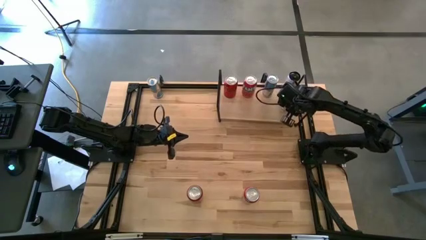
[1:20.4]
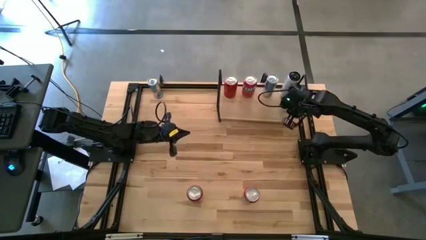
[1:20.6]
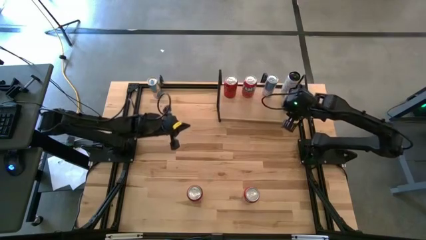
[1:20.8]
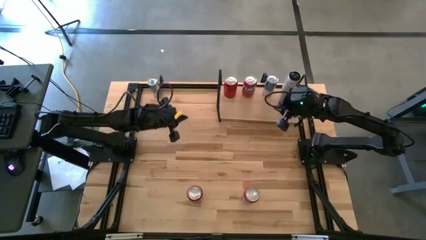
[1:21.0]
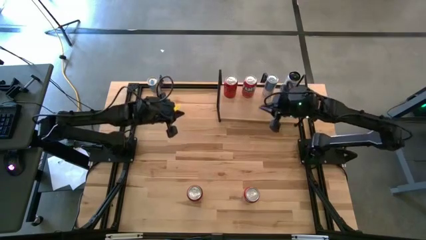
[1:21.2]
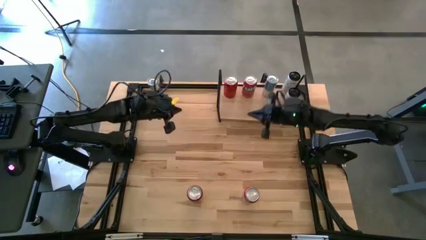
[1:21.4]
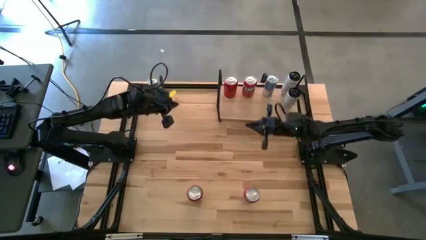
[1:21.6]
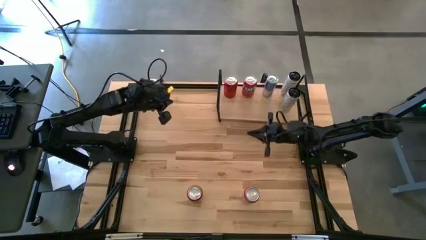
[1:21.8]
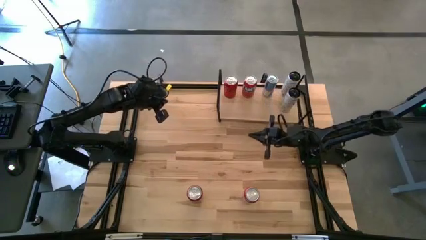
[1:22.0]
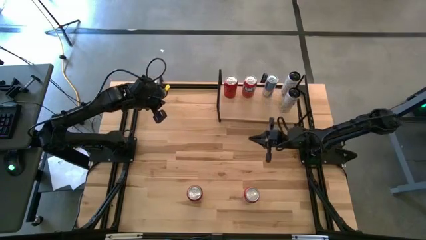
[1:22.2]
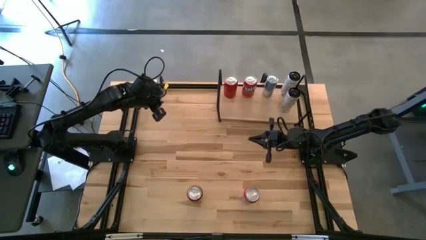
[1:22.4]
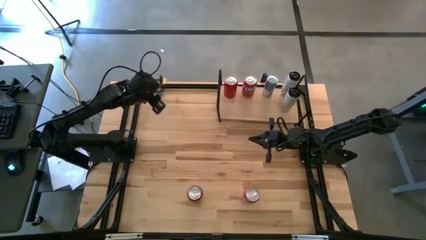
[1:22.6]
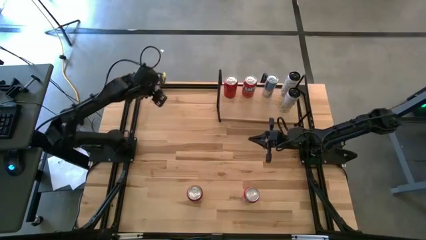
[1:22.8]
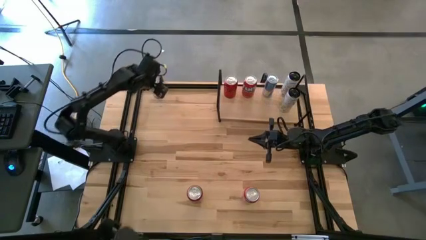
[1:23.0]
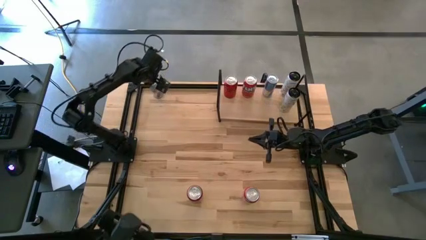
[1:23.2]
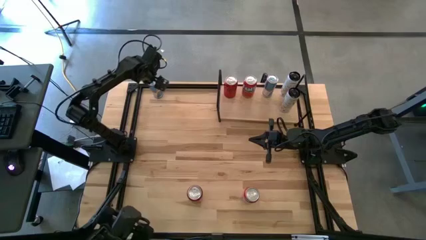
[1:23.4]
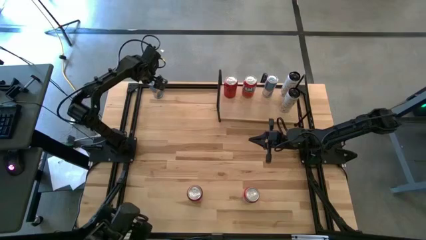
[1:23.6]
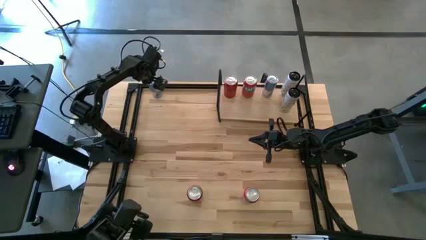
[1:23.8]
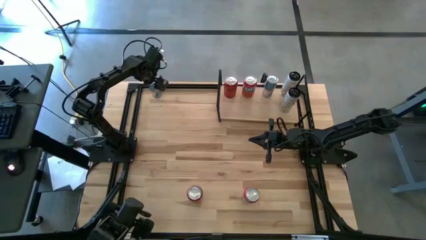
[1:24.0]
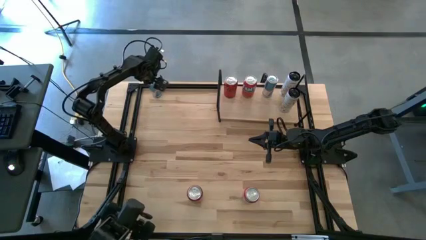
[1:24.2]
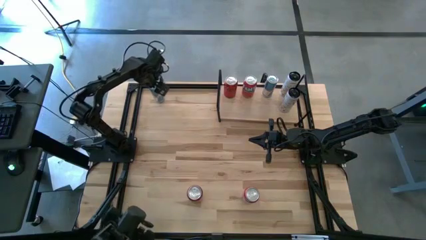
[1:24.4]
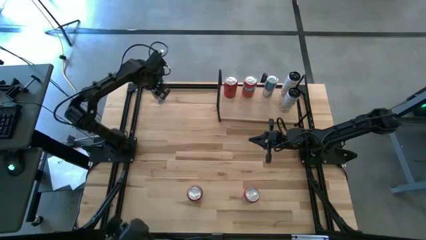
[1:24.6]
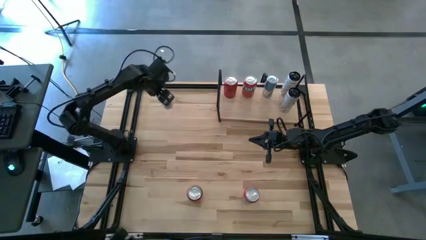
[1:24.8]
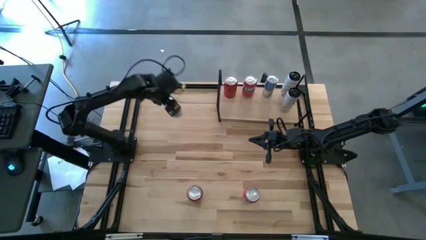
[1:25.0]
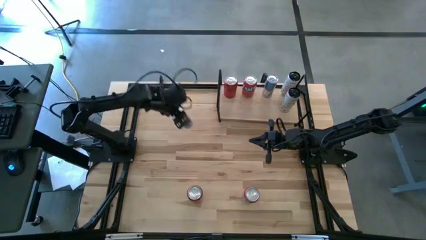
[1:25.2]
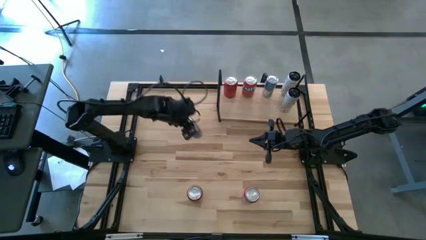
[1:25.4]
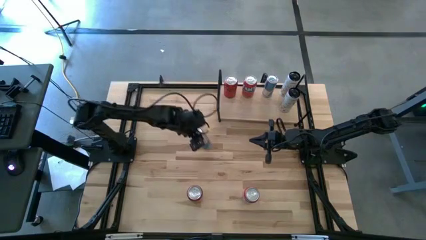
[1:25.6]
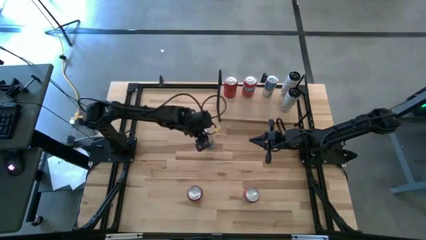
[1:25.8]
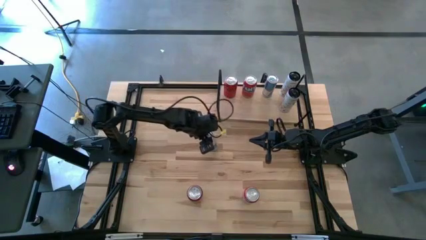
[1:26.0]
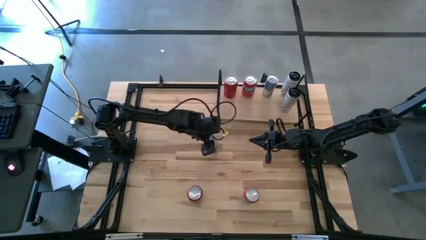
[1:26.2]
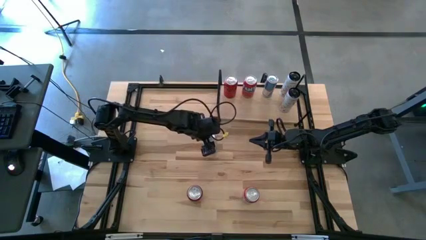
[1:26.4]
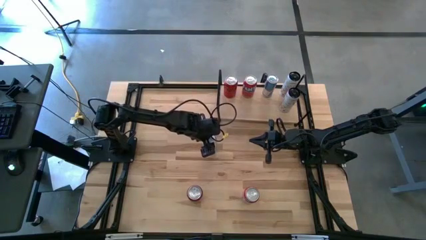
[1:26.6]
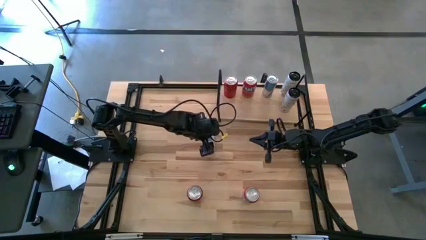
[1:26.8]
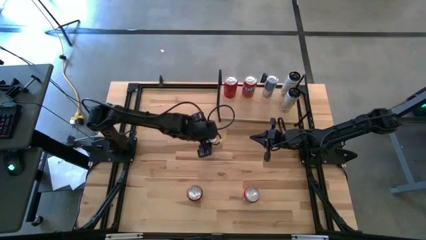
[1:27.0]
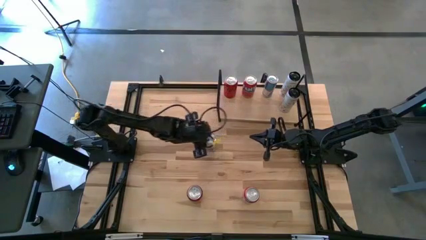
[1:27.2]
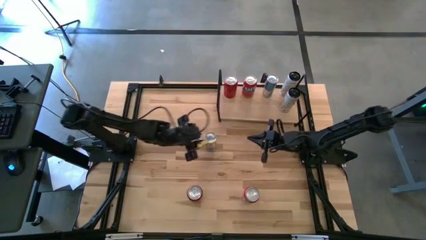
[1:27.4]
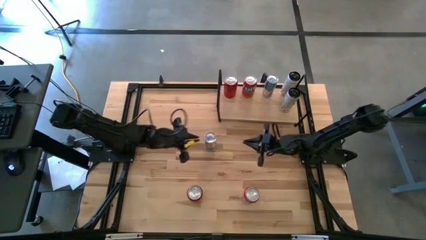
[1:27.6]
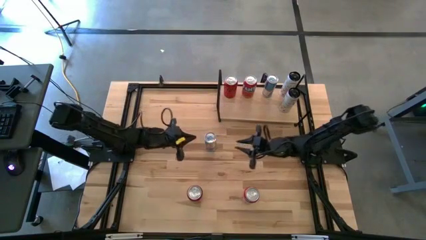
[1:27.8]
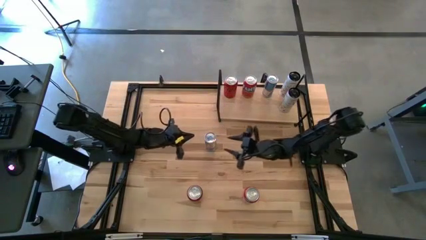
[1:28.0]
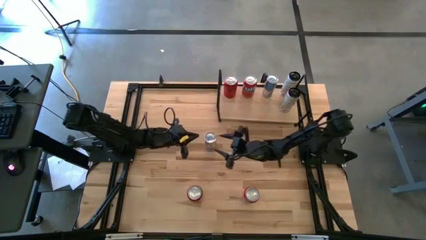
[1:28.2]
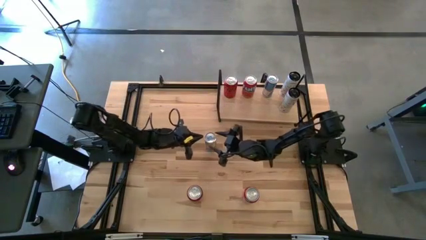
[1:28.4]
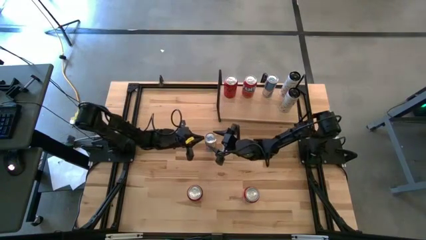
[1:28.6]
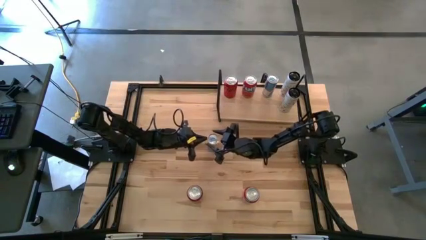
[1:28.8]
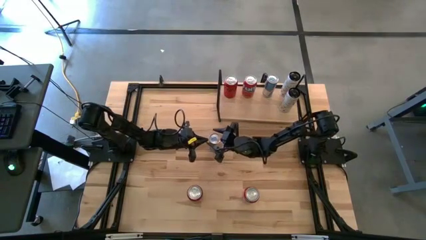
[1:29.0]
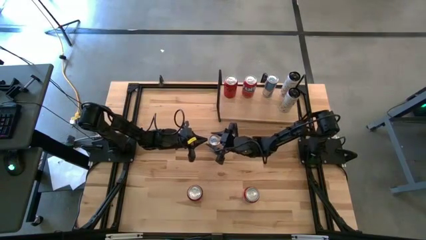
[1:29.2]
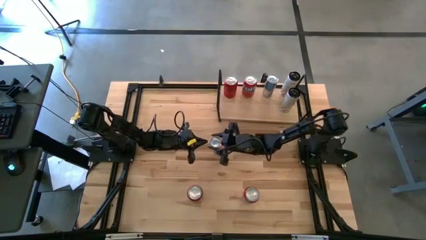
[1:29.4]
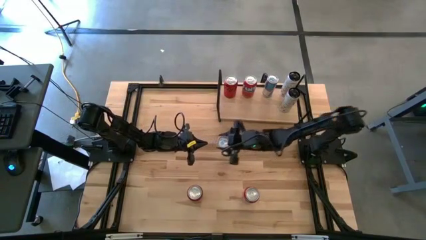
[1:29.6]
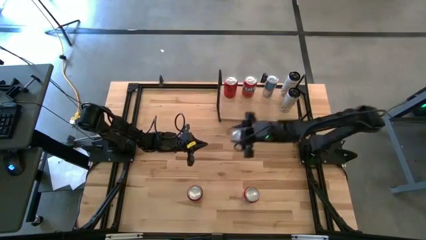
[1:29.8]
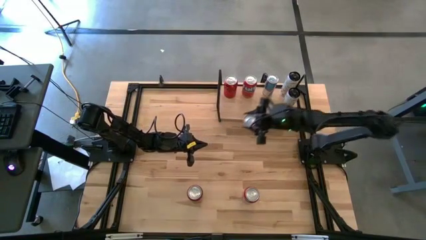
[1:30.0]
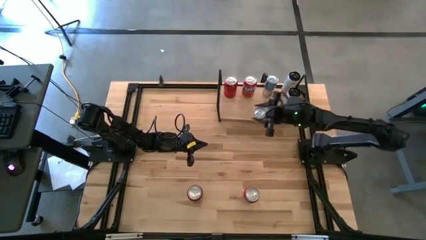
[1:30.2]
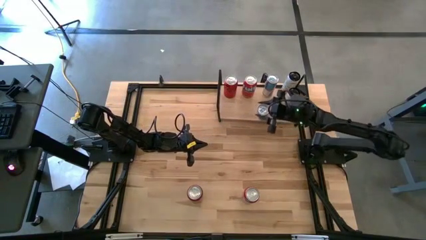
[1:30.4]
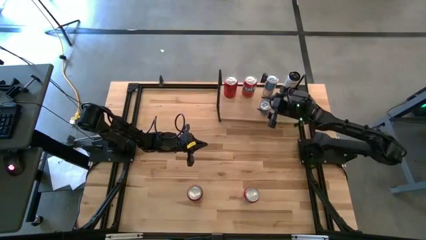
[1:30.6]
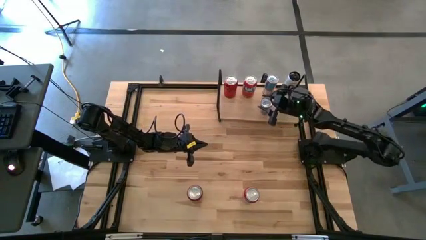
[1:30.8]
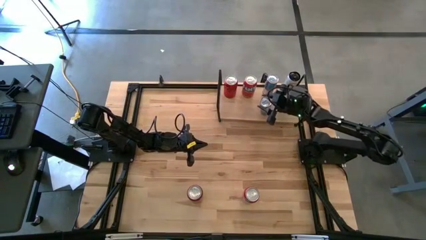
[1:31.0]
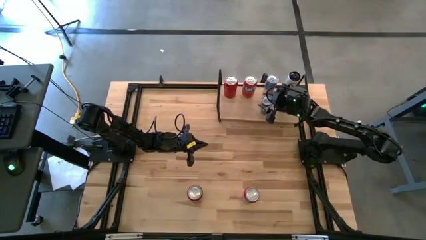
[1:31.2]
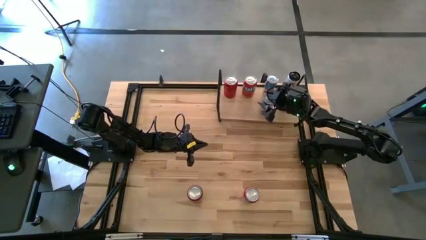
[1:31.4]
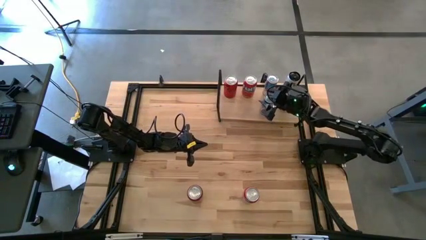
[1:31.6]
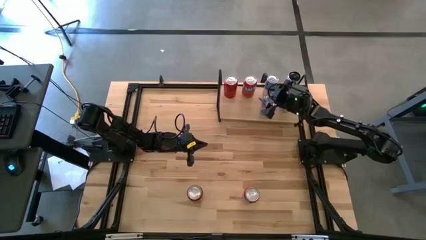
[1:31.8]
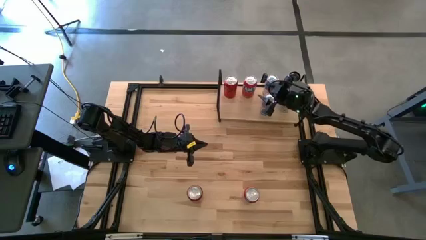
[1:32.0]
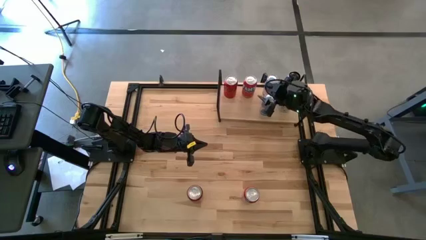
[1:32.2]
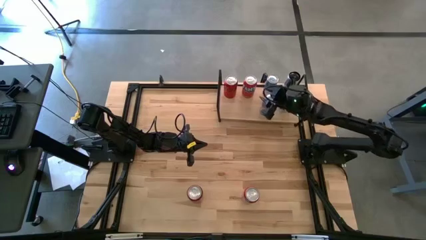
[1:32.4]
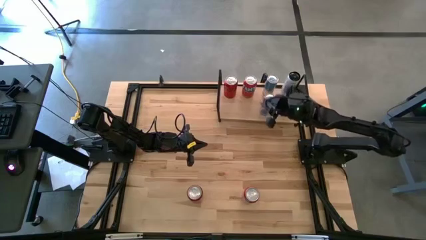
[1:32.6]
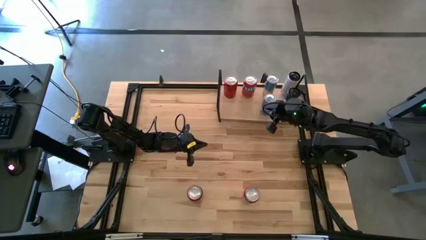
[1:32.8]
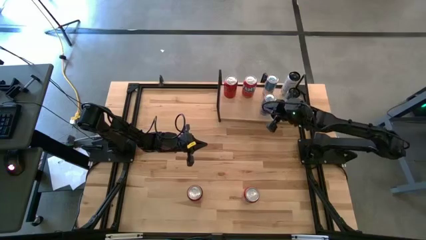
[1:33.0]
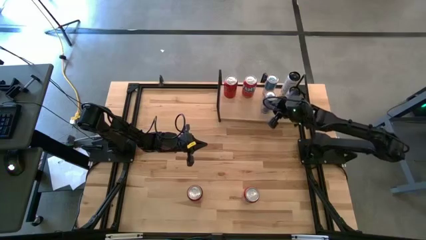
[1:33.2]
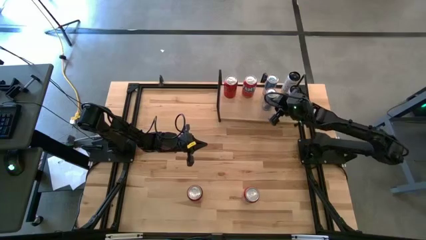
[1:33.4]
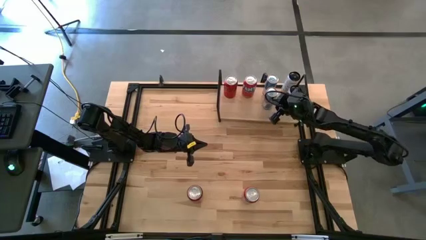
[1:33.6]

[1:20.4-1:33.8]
Task: Place canned beverage on shelf
Put the blue soda can on the shelf aligned with the other blue soda can
